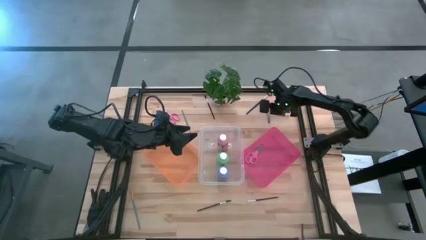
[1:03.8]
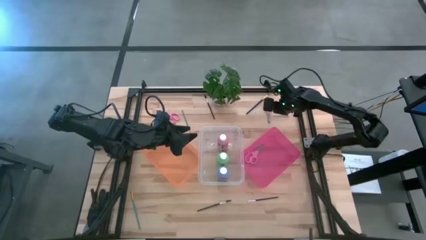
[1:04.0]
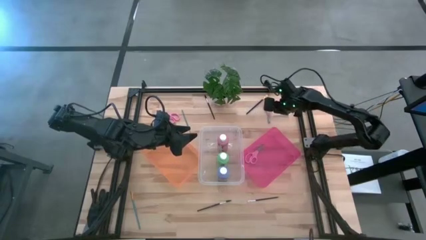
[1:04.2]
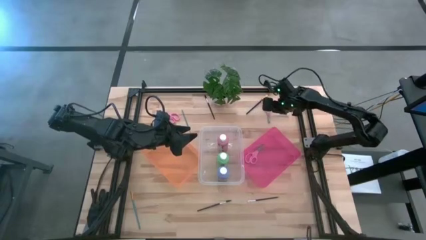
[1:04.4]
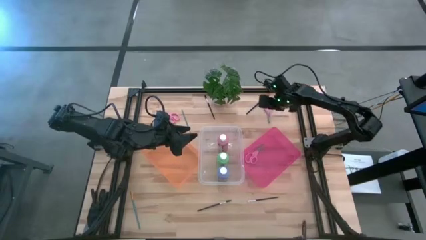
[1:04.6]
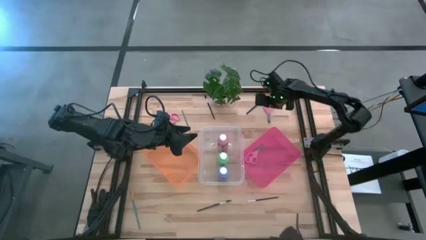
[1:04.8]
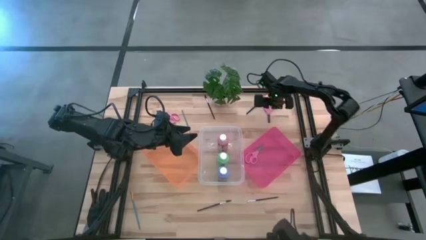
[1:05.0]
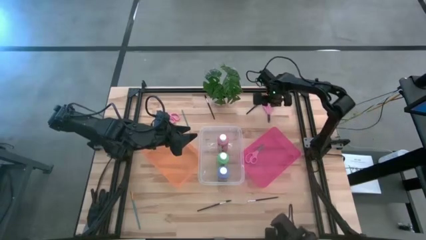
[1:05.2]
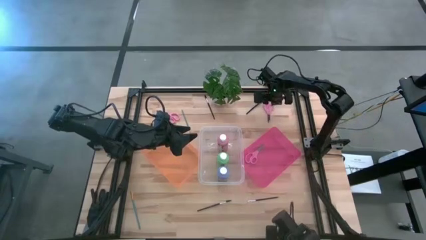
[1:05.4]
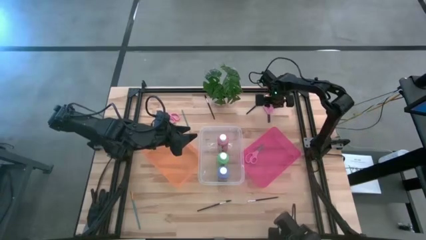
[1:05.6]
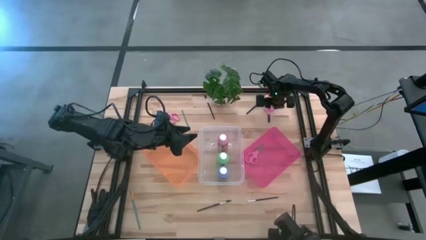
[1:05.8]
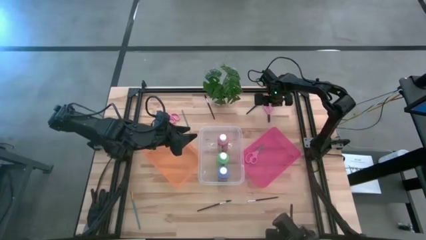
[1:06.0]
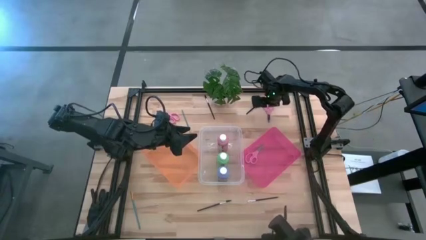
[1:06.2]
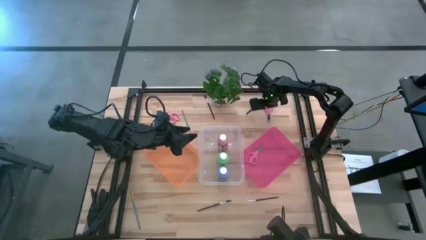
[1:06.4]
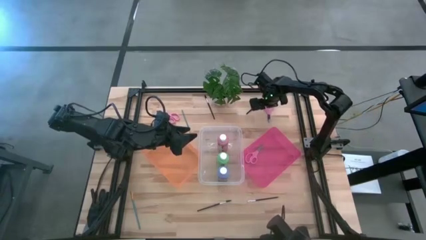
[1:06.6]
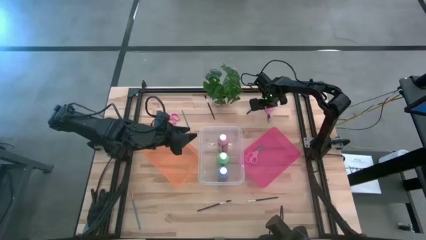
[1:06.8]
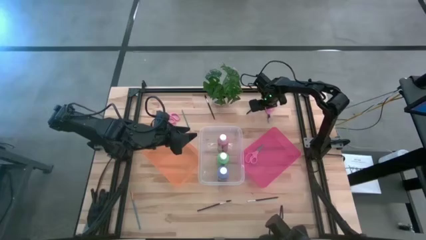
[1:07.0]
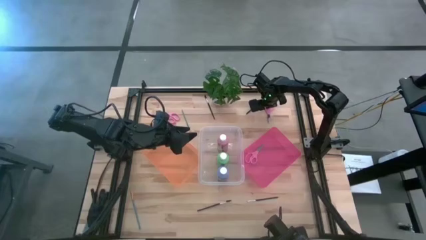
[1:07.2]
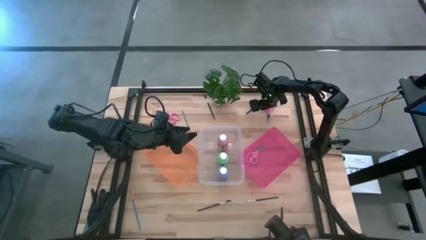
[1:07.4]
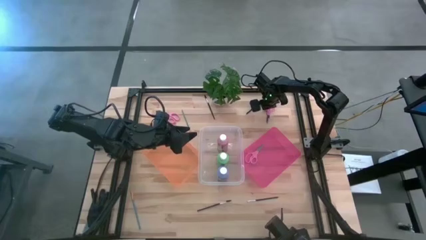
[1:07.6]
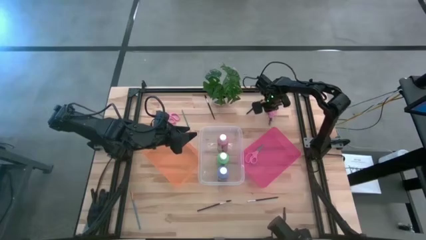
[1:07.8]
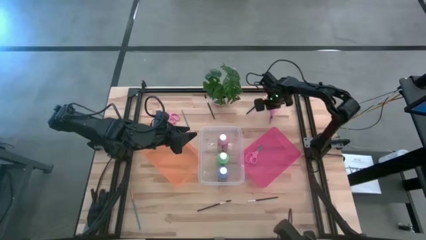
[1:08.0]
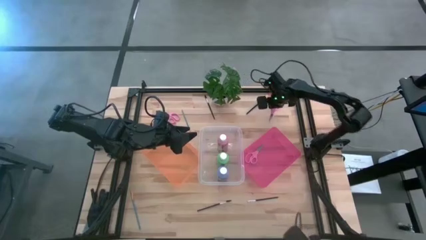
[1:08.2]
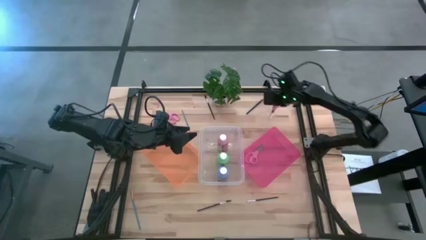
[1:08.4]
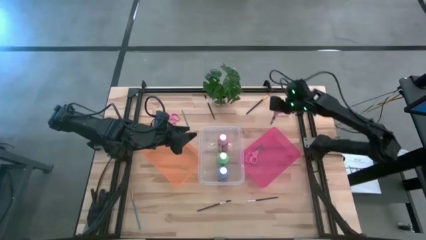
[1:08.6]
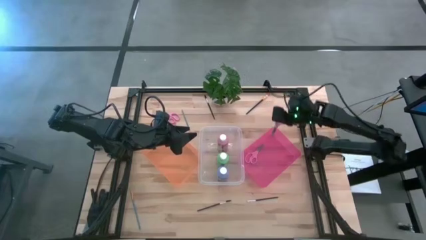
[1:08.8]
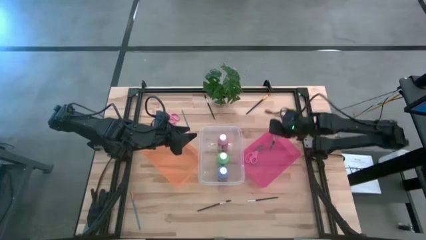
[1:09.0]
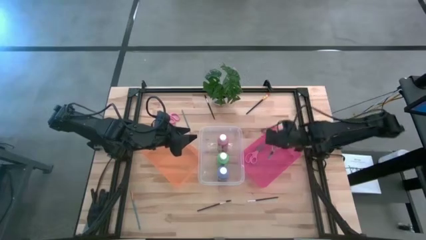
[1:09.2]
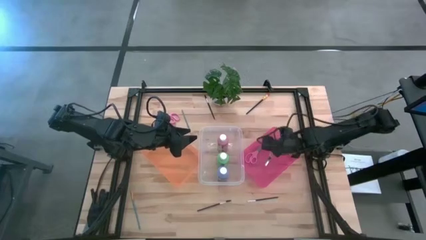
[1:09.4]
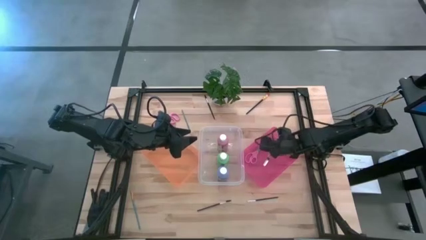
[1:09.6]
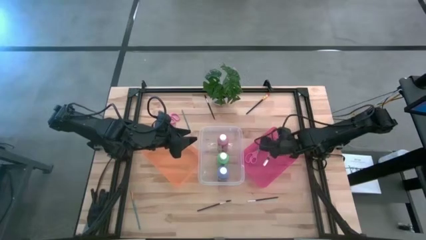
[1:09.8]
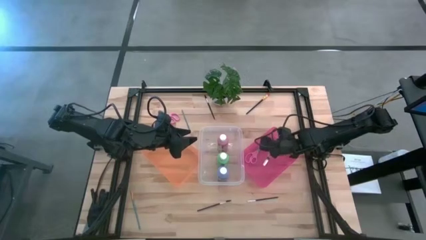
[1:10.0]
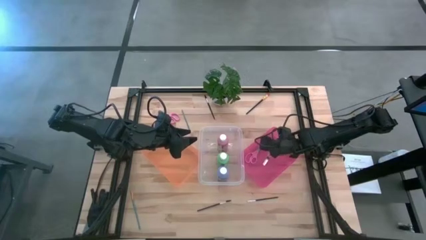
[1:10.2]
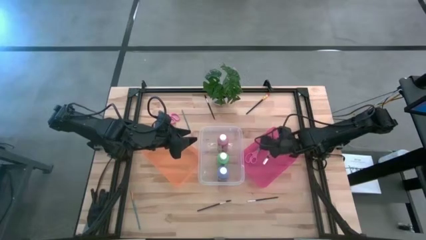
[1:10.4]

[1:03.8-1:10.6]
Task: Pick & Place Paint Supplies
Put the right scissors into the pink bin

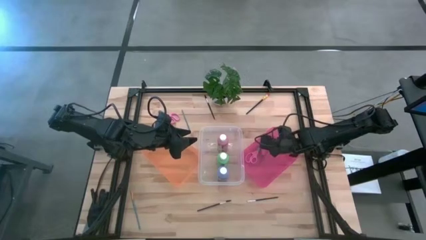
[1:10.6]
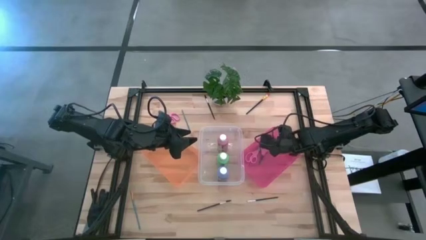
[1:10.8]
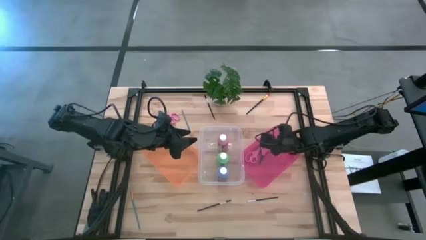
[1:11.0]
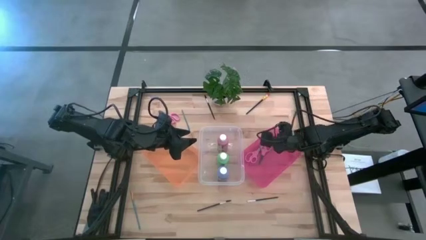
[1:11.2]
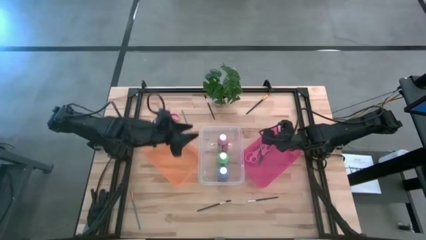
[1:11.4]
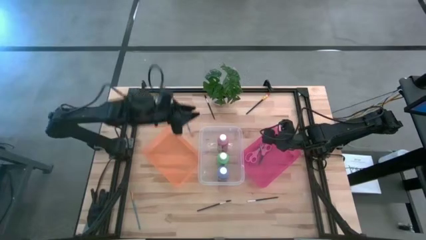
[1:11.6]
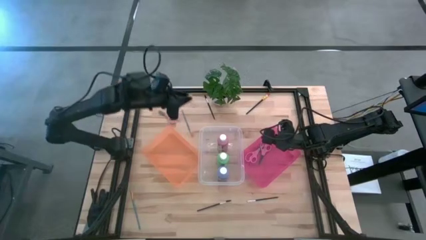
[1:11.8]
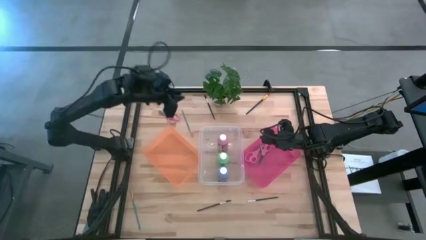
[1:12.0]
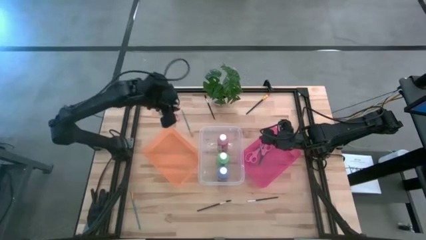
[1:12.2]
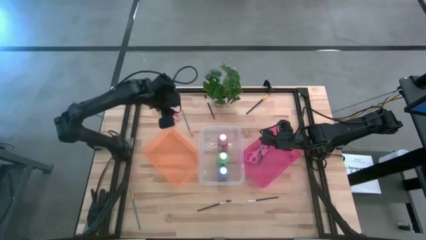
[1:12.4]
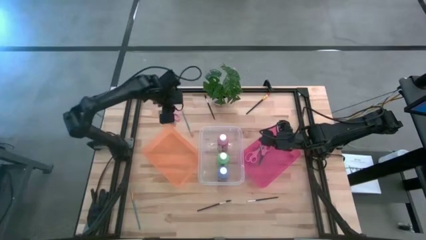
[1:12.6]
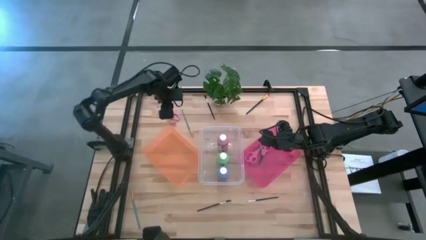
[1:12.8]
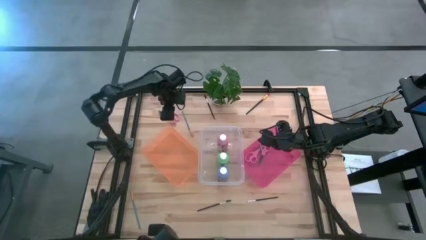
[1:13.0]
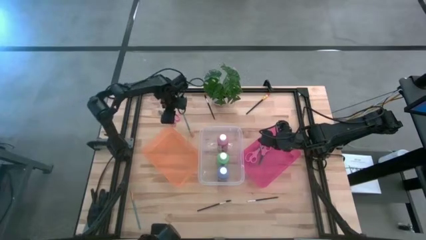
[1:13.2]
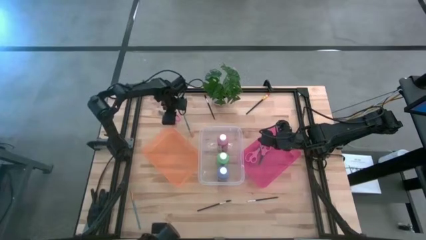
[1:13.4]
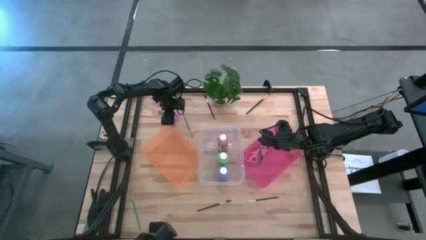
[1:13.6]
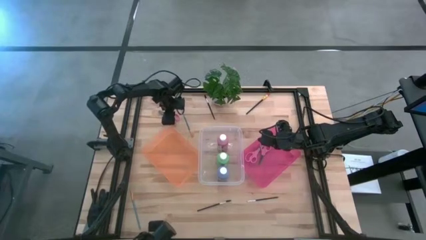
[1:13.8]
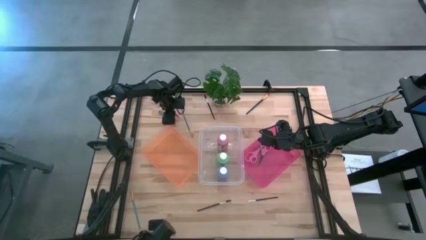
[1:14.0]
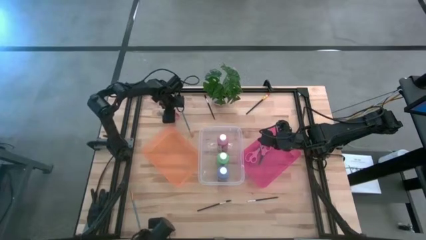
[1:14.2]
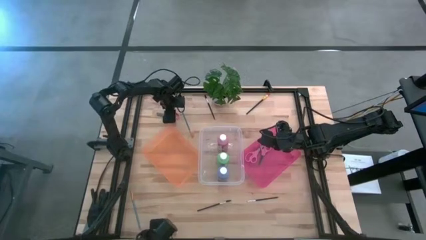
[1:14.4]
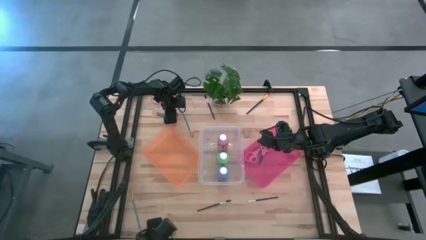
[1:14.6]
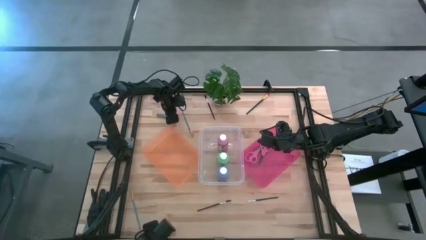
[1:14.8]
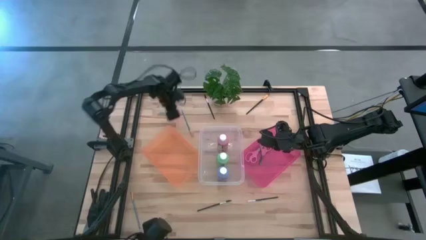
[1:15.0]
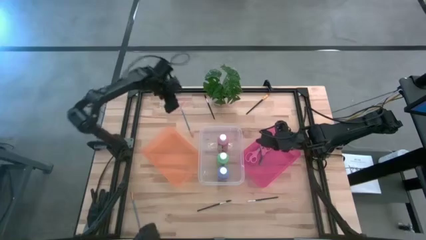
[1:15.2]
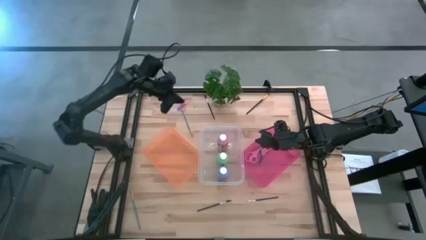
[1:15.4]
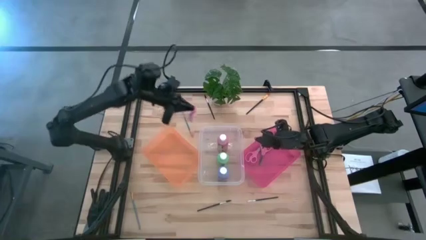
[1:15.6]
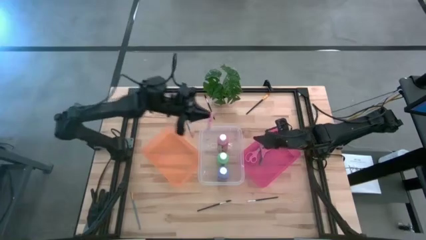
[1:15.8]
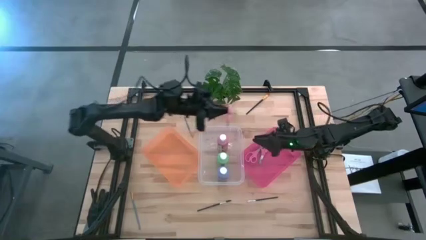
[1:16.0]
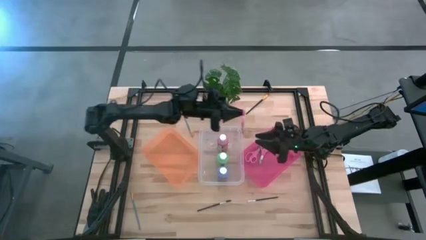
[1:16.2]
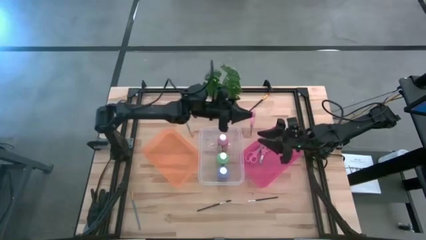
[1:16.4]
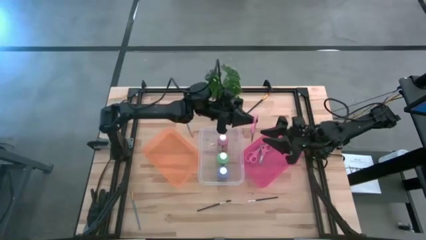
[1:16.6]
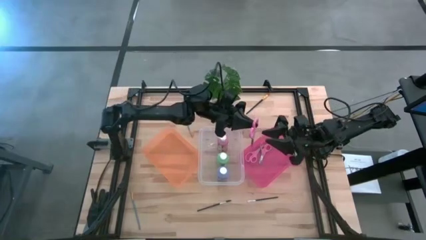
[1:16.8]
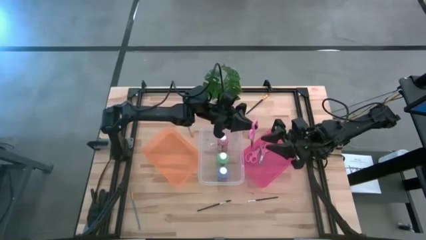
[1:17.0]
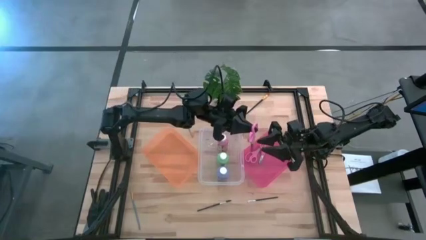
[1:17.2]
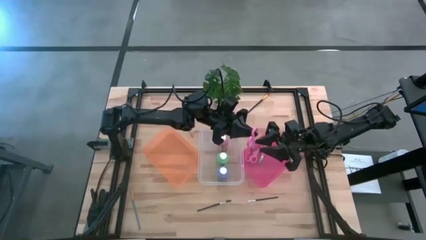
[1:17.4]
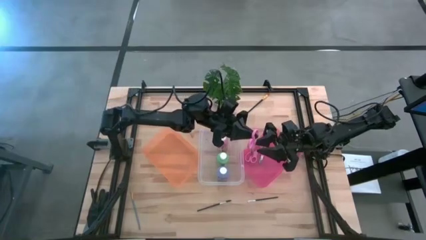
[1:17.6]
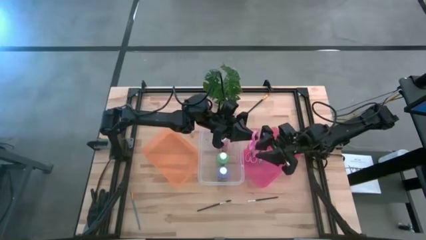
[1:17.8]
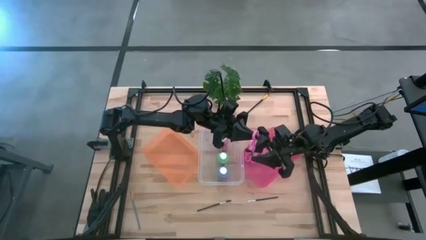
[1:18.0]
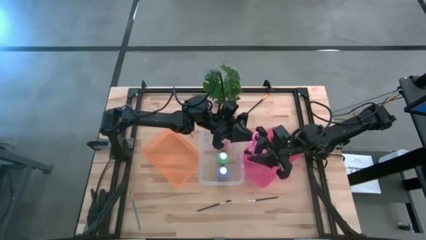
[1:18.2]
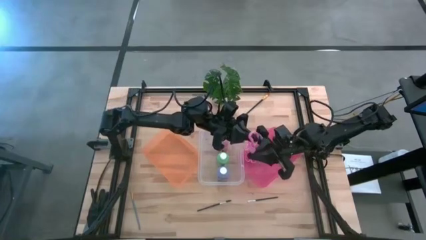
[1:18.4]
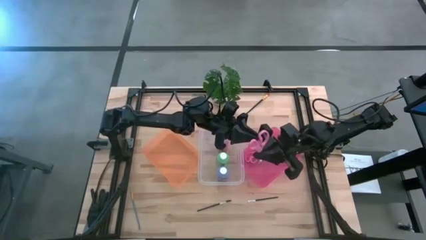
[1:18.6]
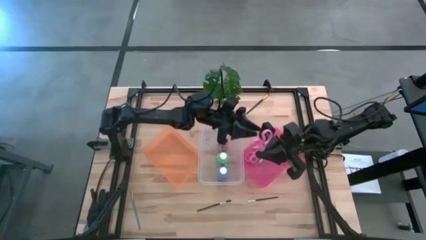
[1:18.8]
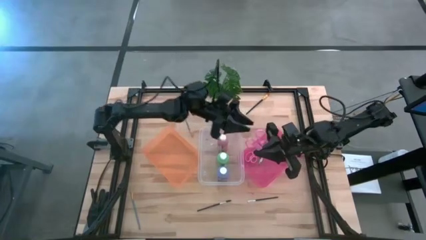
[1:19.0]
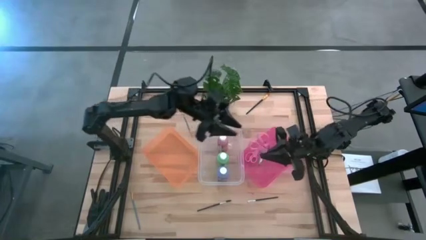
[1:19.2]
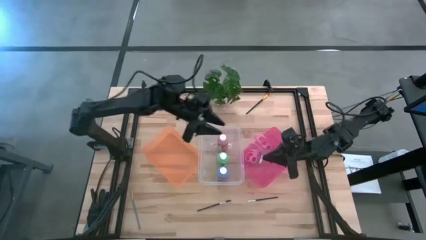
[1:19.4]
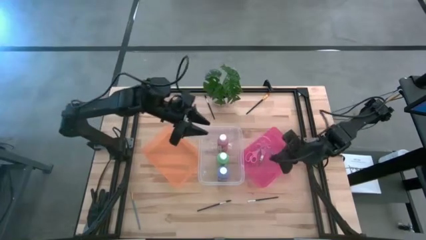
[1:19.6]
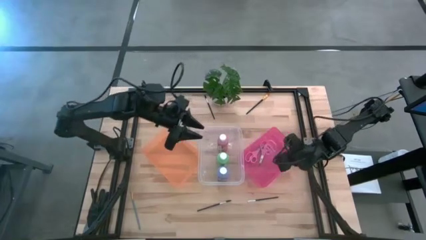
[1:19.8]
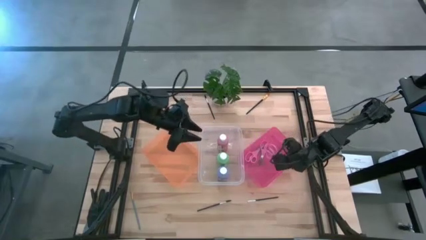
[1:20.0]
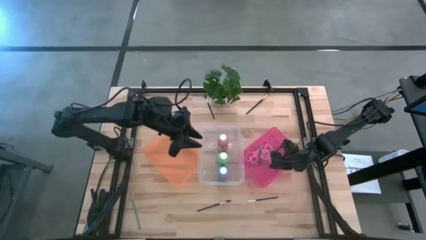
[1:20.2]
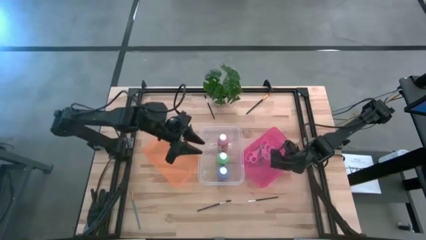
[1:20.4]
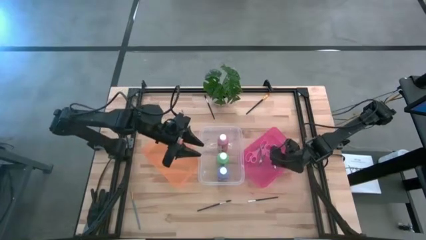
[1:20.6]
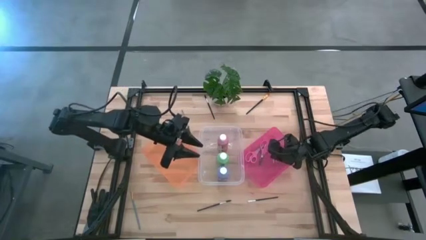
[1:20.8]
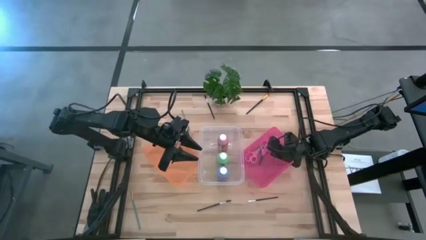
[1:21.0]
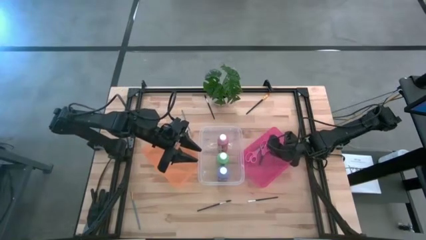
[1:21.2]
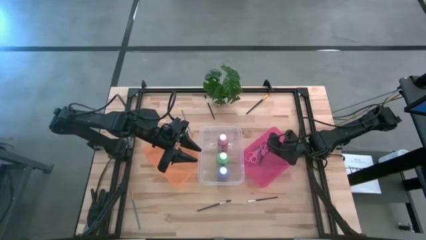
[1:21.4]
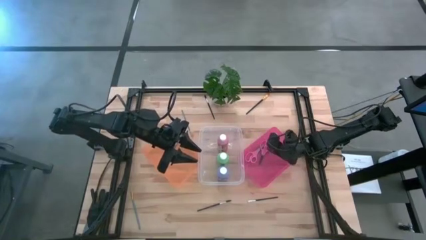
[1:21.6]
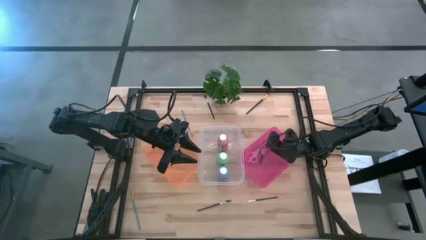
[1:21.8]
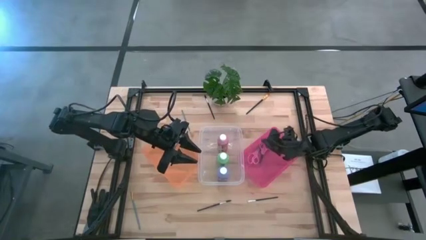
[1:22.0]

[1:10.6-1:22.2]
Put the scissors into the pink bin
